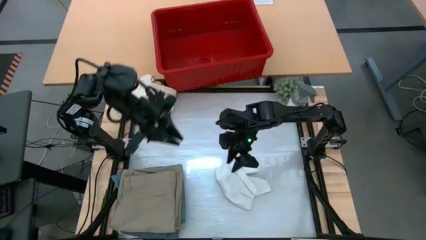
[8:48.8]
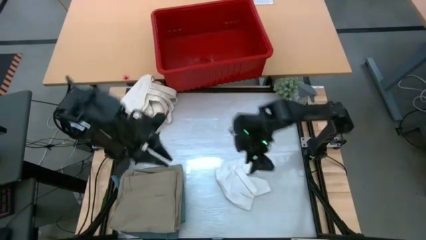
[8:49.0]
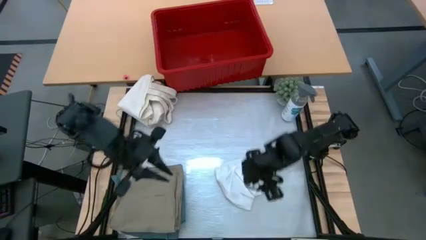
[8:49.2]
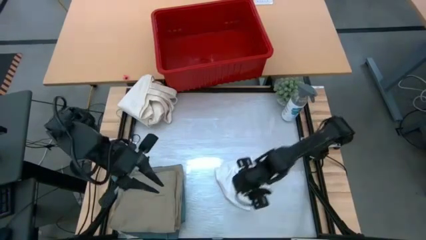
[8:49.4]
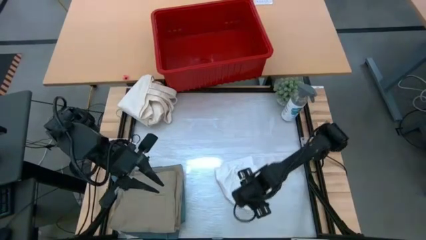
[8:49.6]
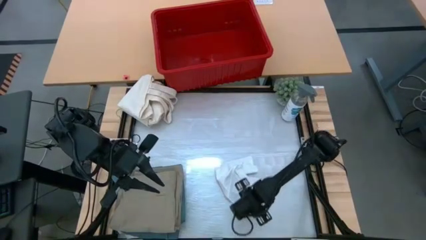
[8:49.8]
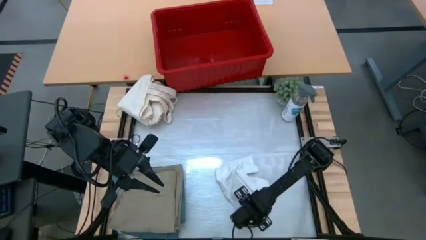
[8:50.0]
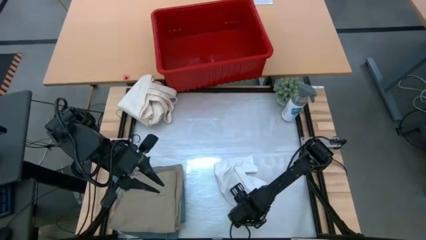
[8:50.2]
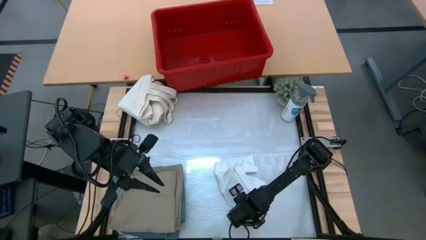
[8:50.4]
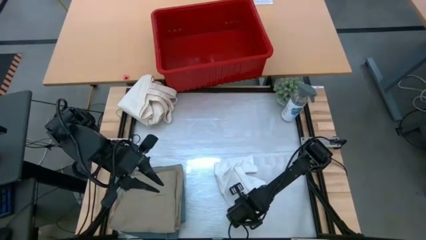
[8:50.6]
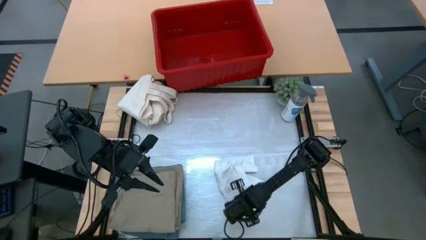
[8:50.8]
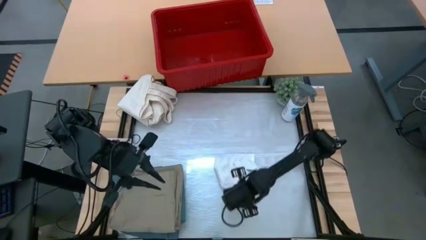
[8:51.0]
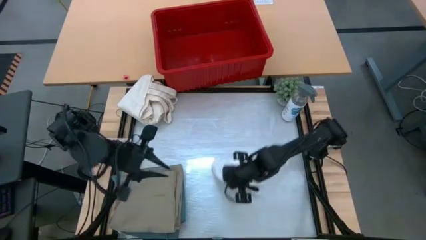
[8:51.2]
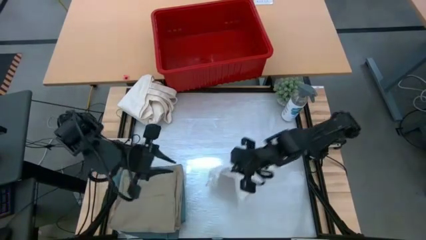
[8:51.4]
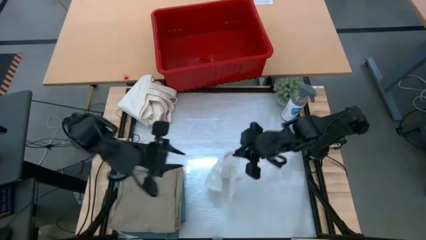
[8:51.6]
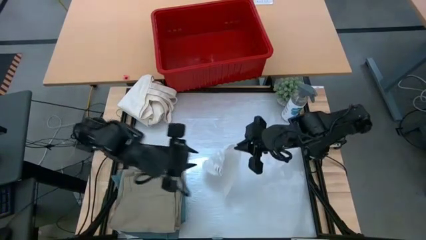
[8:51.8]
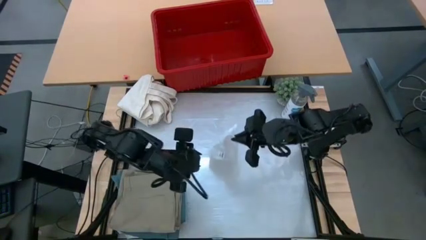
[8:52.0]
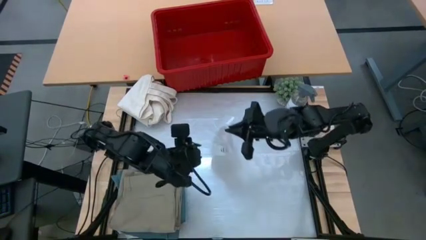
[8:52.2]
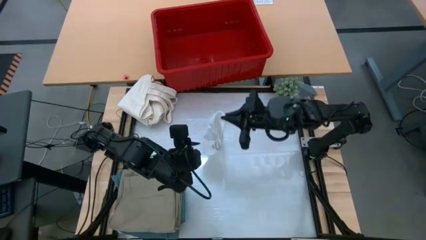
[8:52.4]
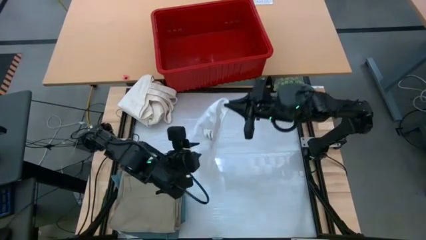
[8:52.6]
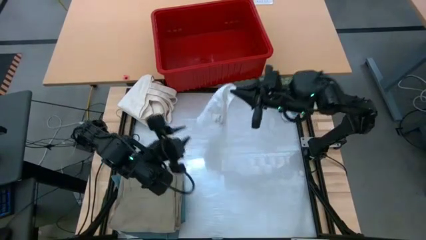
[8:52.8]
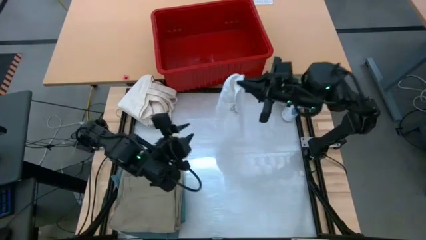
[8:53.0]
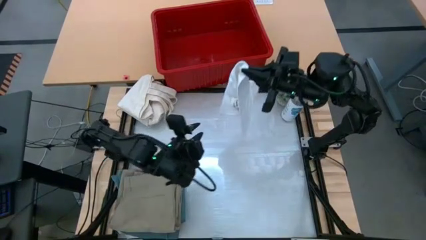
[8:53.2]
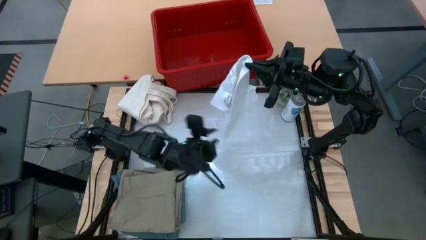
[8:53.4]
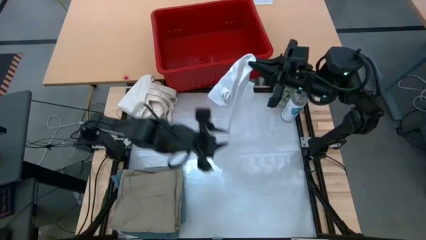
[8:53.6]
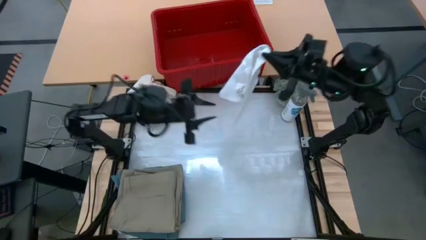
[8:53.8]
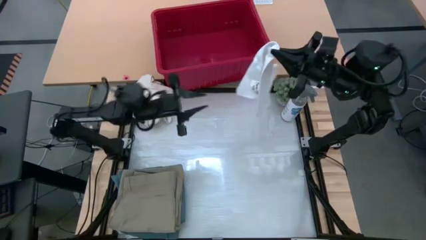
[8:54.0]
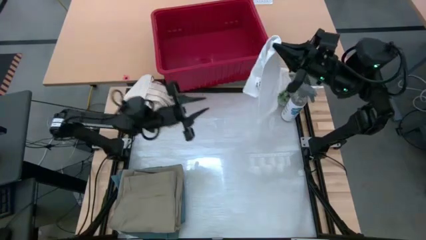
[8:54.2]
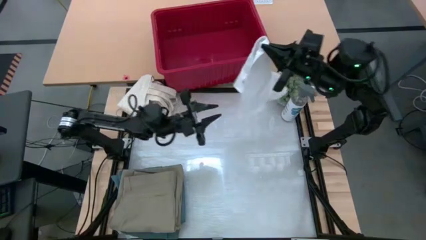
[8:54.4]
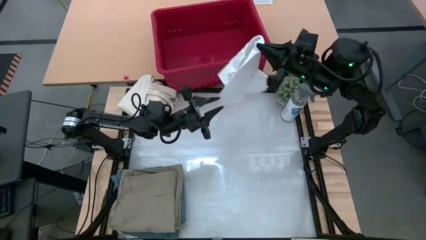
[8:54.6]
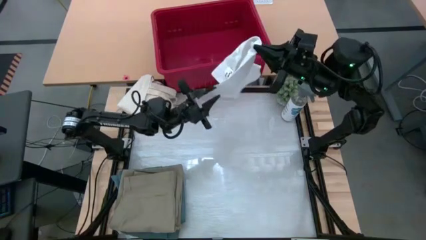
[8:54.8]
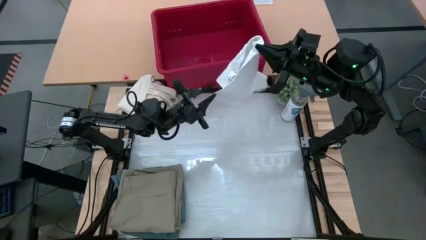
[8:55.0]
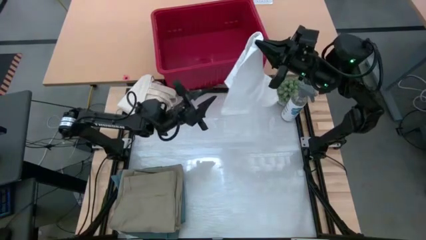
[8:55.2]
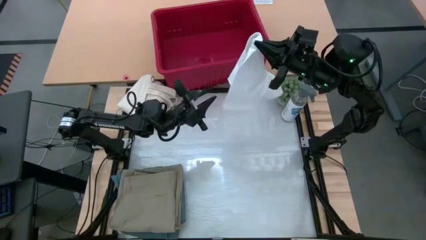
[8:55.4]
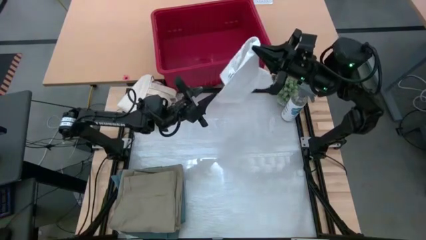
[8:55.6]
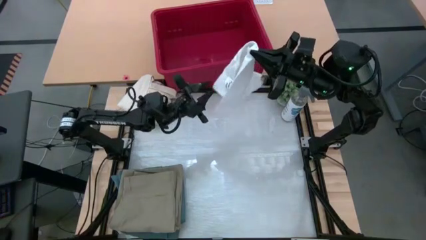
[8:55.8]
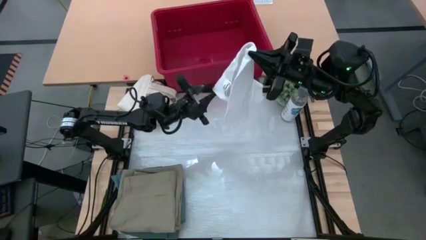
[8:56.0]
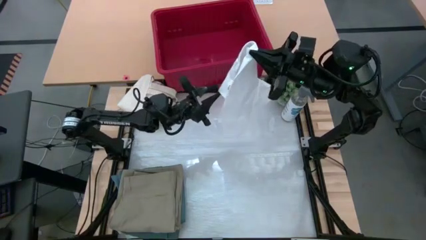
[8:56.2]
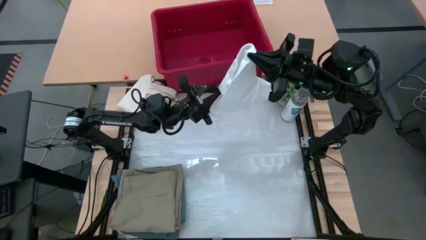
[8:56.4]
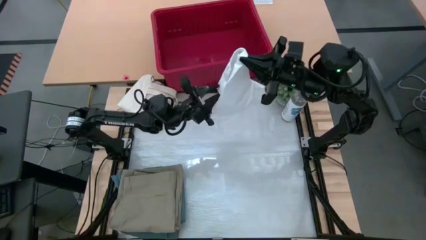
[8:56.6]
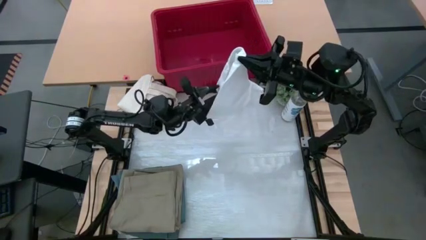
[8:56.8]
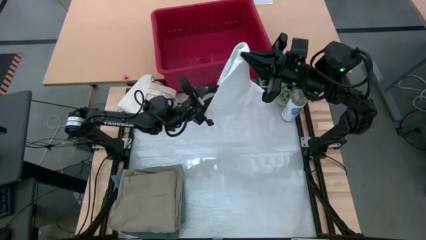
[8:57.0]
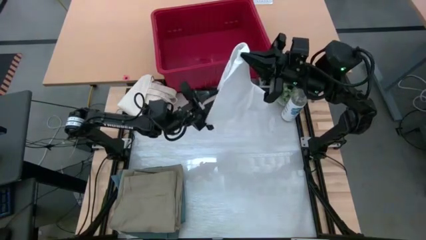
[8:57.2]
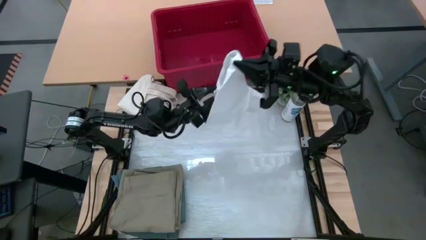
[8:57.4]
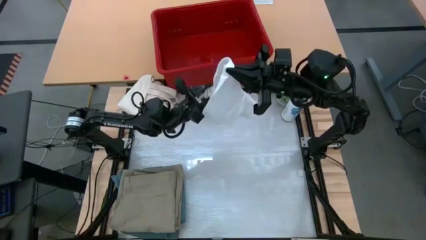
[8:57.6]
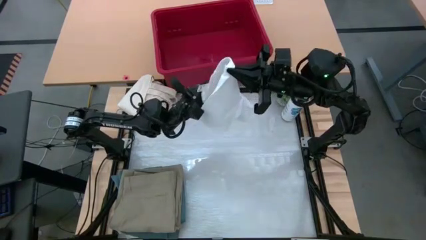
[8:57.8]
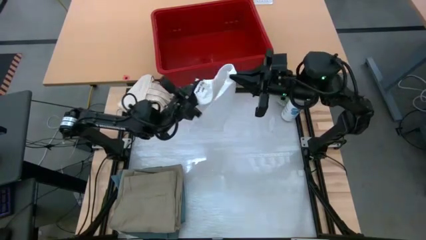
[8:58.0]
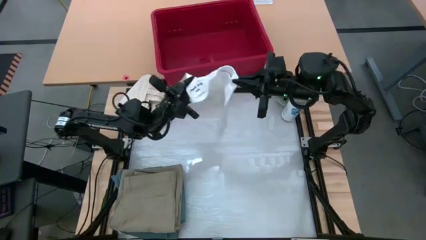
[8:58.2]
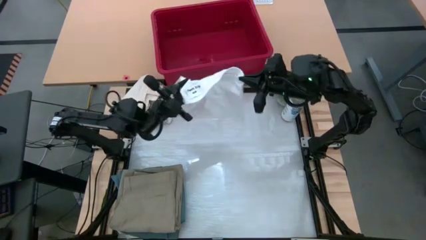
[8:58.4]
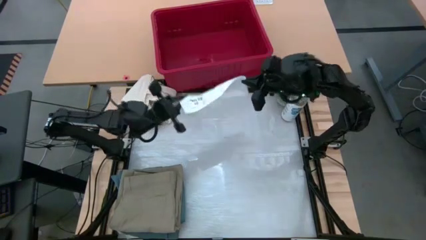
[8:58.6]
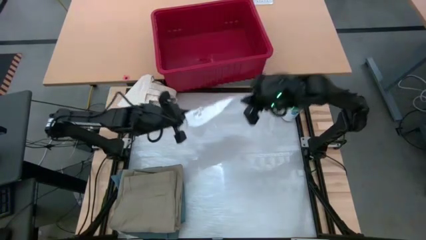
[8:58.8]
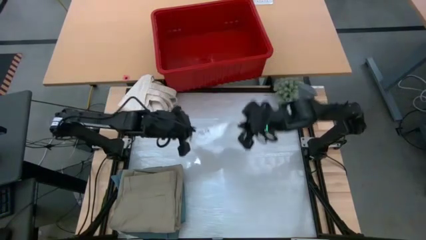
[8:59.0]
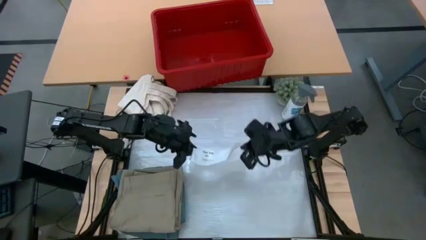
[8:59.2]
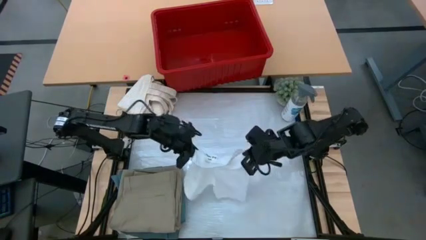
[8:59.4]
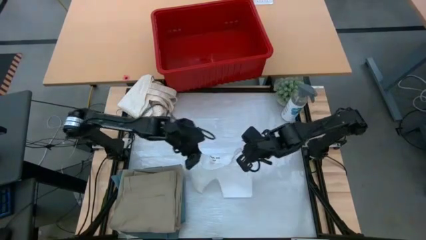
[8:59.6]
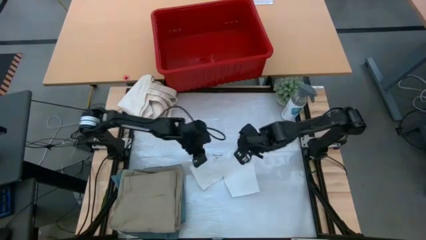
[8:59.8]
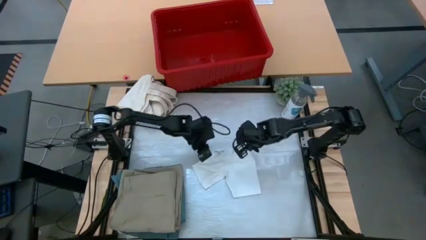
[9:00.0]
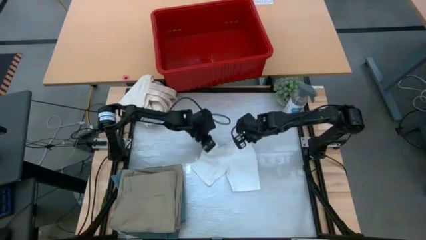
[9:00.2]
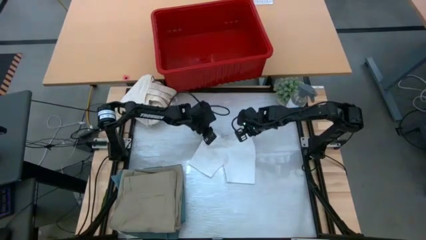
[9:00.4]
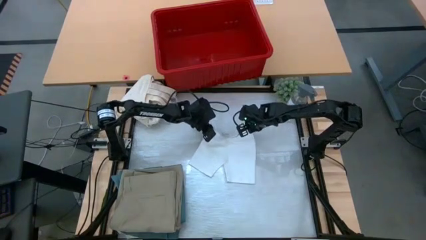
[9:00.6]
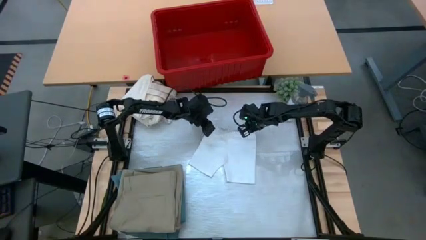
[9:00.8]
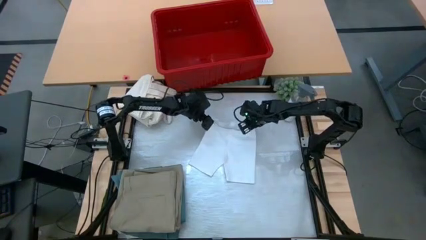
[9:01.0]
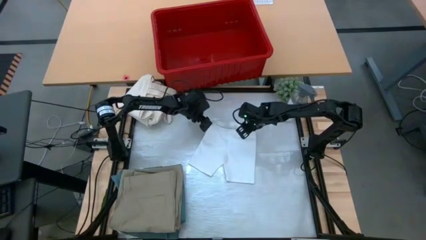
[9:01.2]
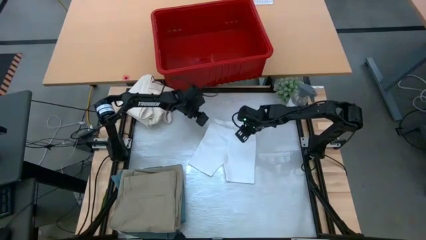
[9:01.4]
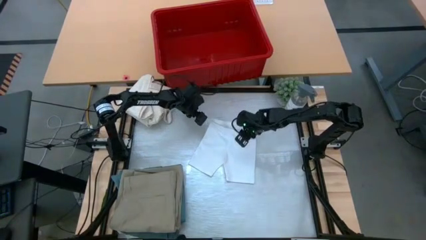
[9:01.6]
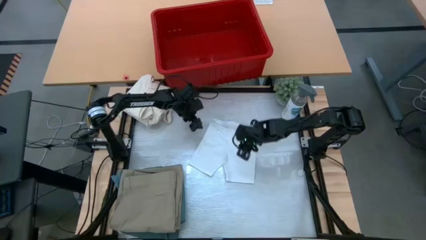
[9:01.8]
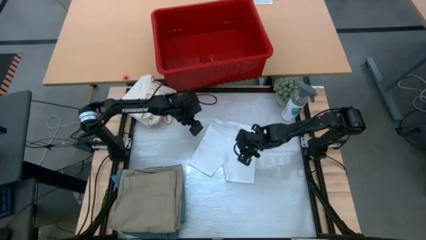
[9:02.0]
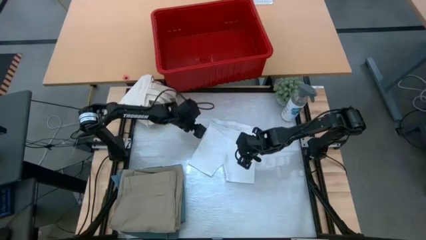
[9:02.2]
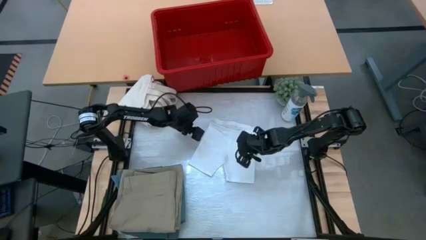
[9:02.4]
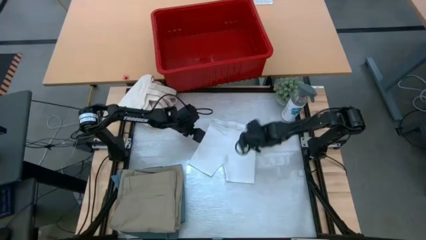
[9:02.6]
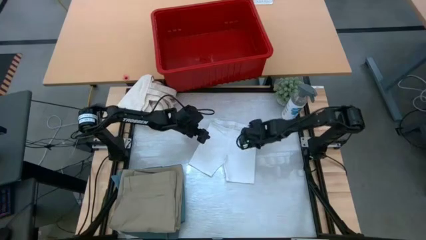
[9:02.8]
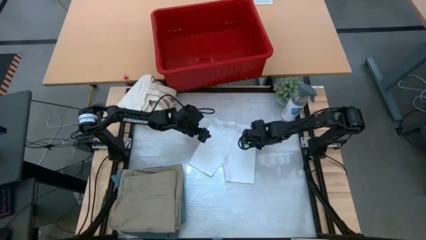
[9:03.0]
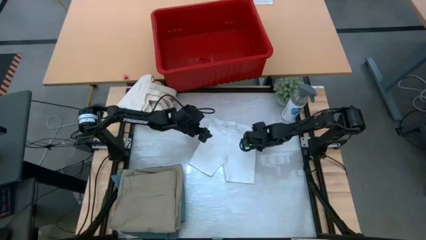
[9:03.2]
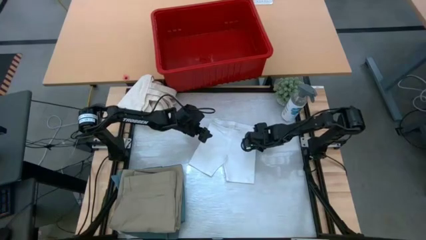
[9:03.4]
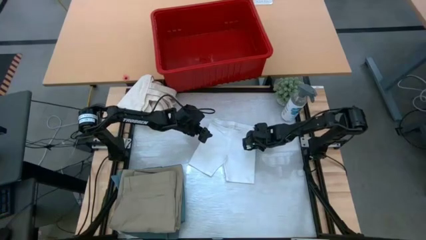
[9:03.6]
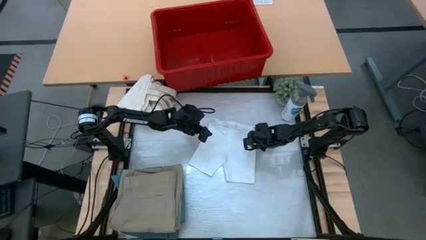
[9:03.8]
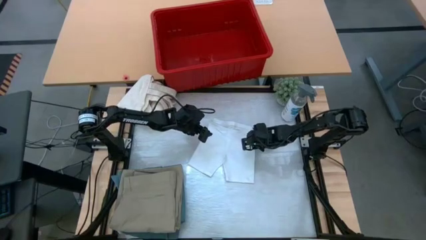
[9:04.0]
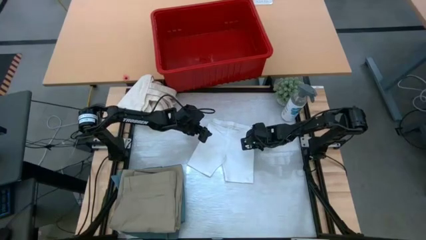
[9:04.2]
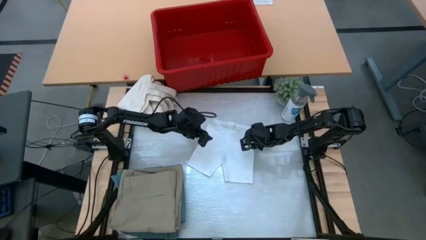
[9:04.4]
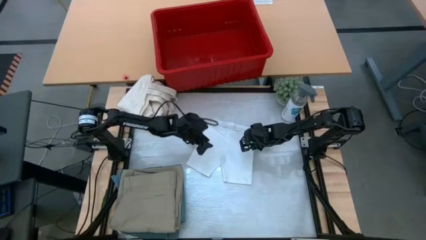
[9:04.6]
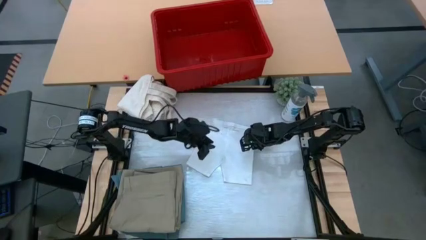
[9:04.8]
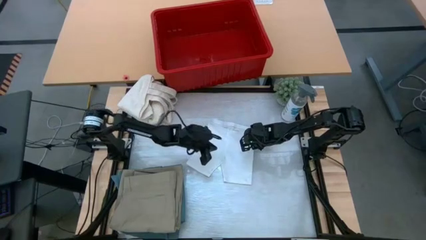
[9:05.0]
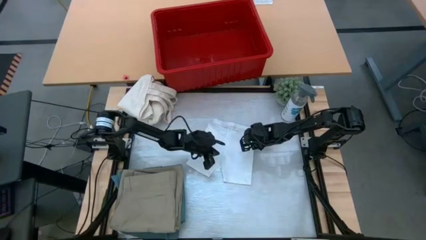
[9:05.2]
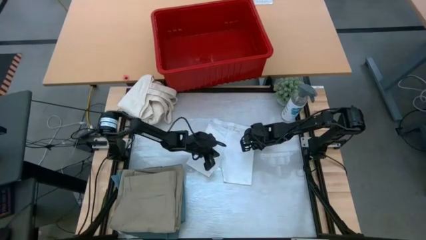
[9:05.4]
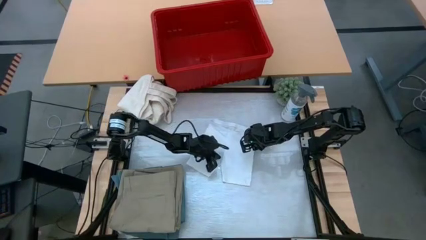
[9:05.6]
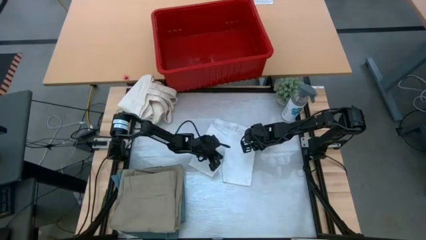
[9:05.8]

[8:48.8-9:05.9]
Task: Fold Laundry from Bin
Fold the white underwear
